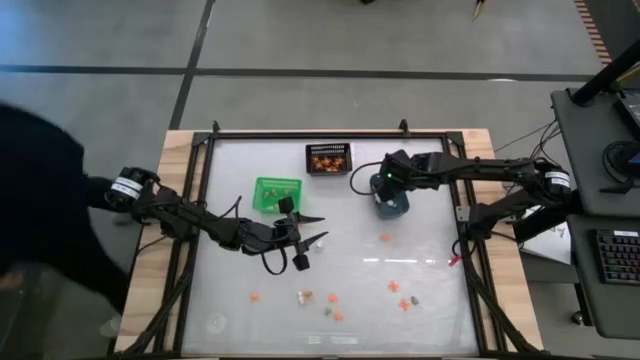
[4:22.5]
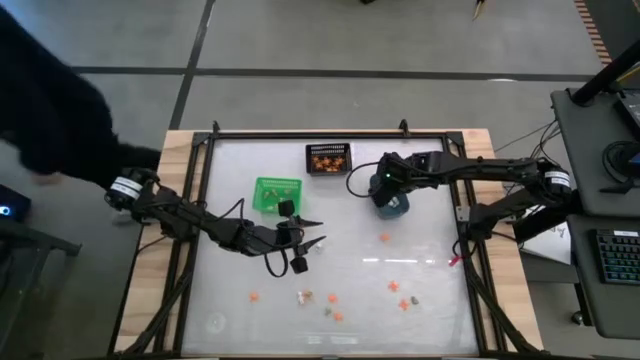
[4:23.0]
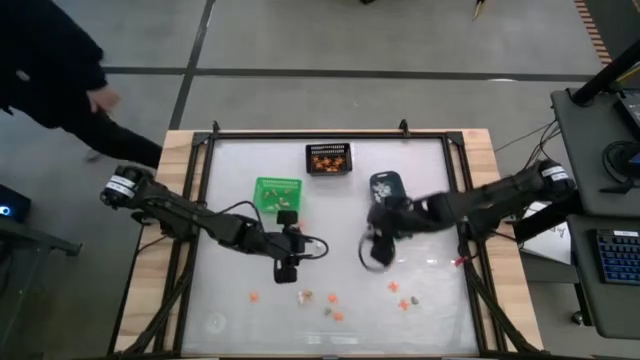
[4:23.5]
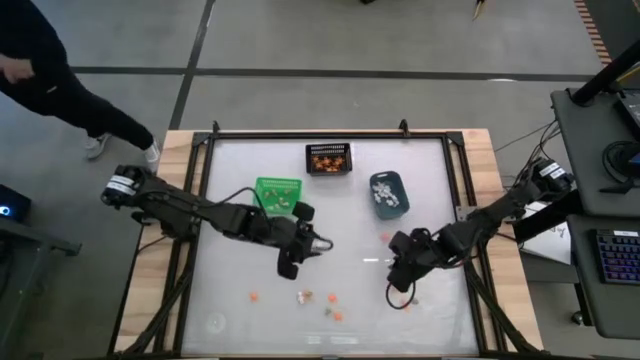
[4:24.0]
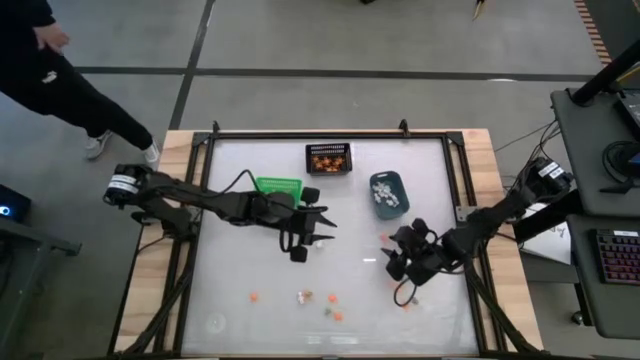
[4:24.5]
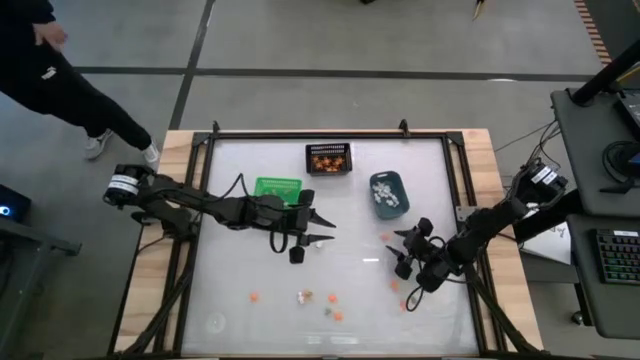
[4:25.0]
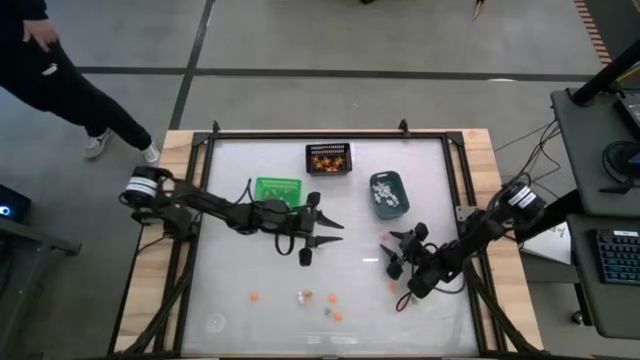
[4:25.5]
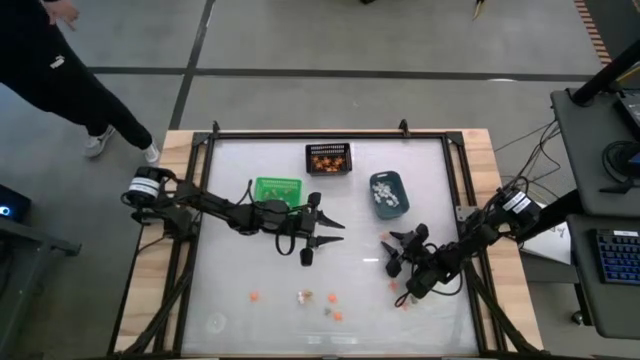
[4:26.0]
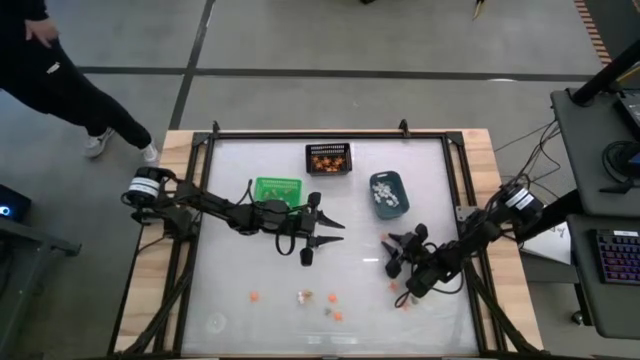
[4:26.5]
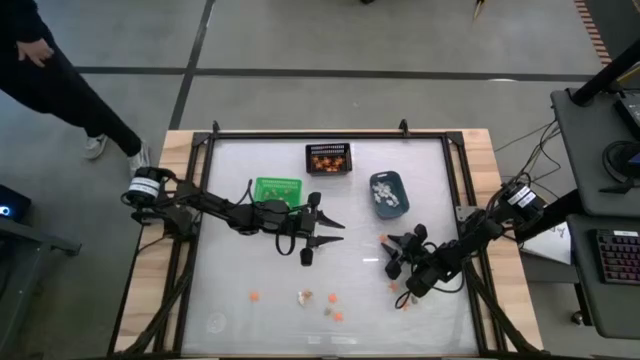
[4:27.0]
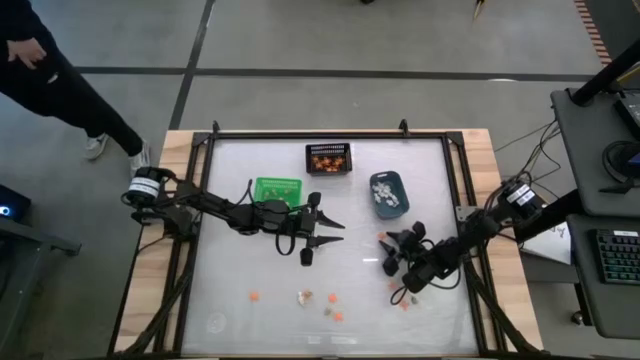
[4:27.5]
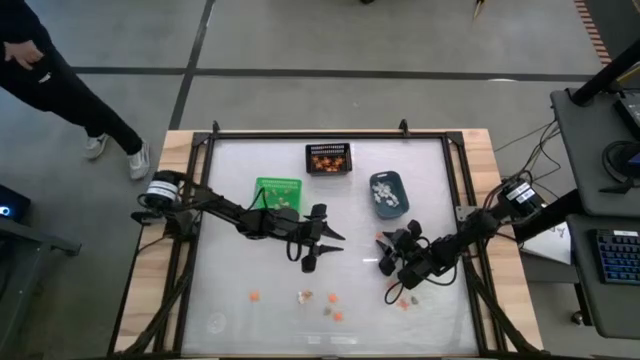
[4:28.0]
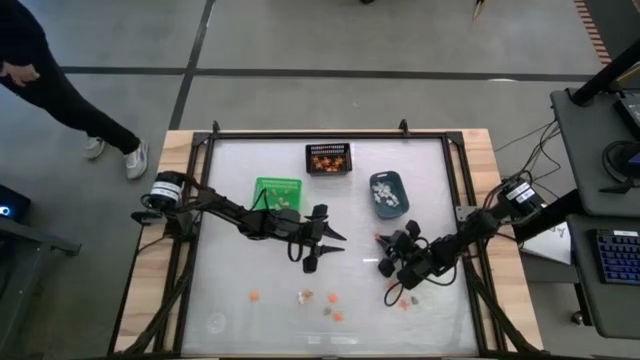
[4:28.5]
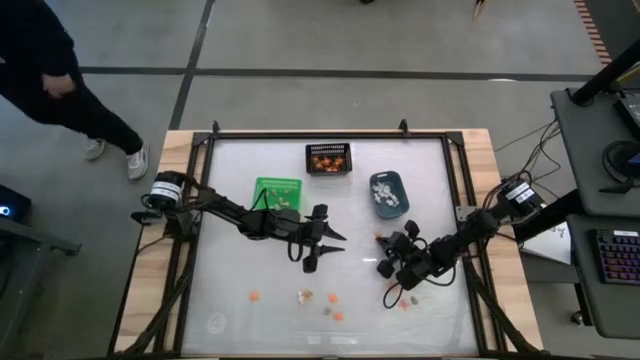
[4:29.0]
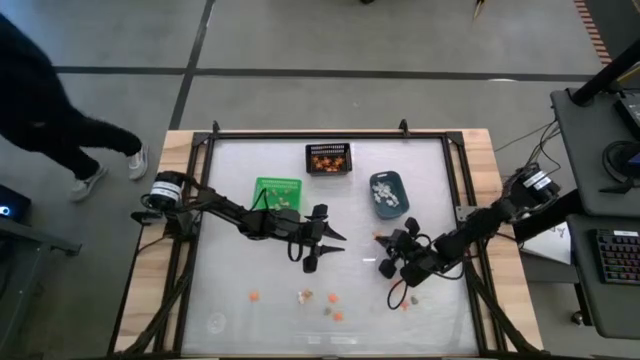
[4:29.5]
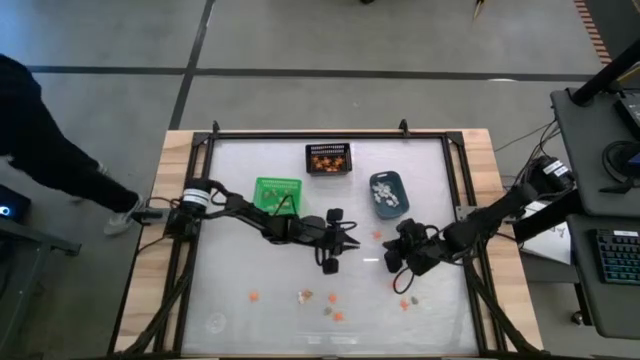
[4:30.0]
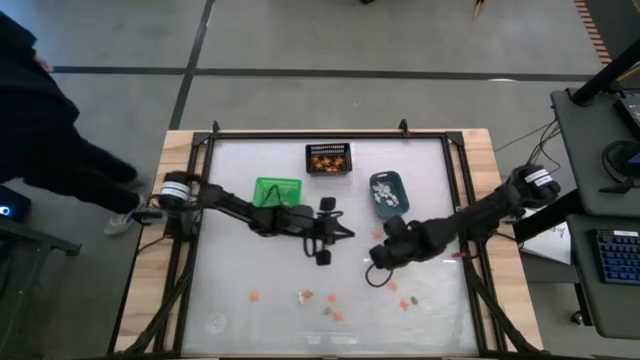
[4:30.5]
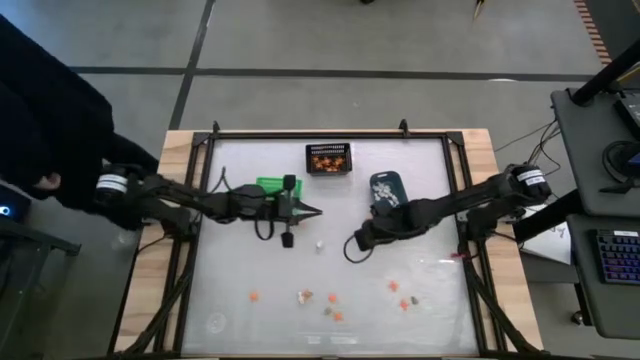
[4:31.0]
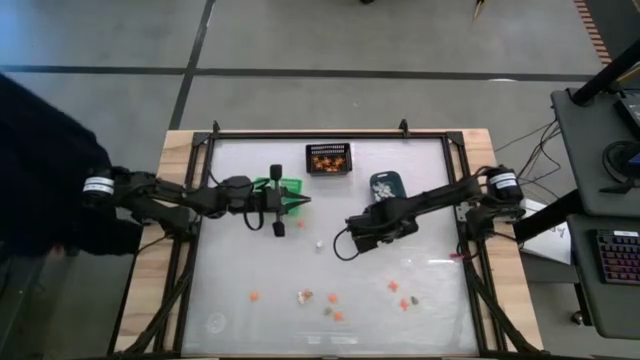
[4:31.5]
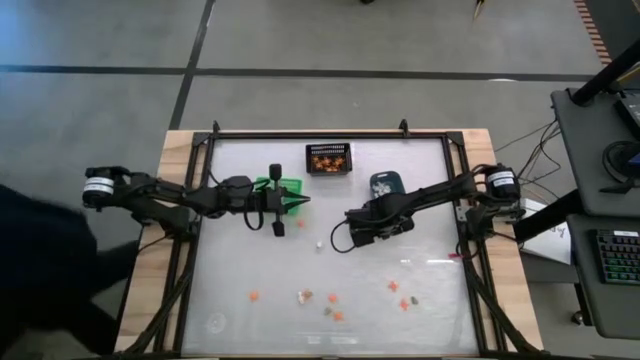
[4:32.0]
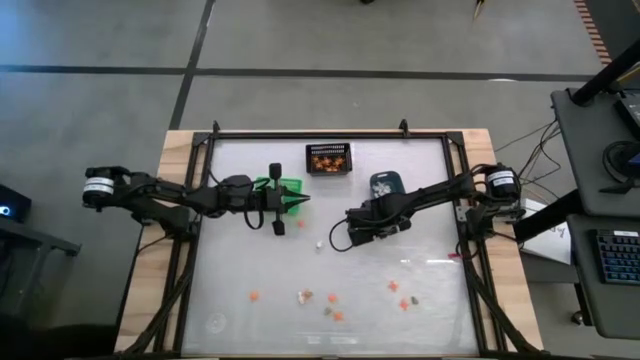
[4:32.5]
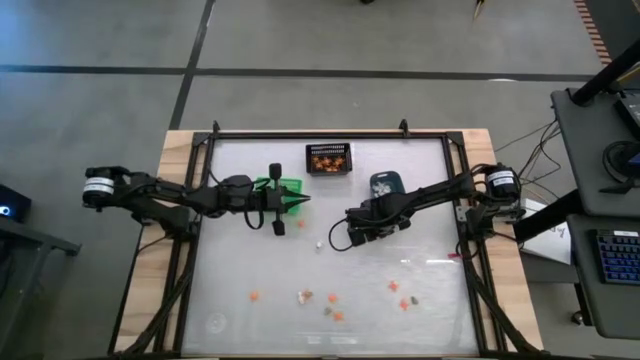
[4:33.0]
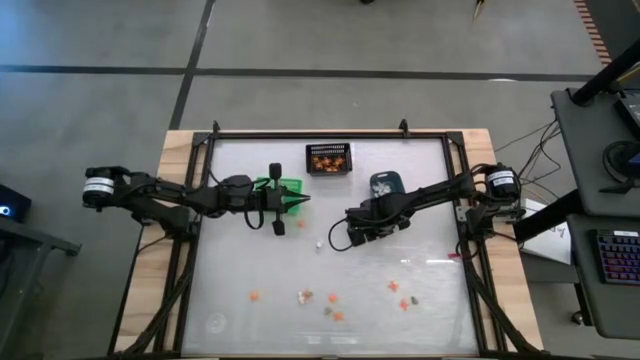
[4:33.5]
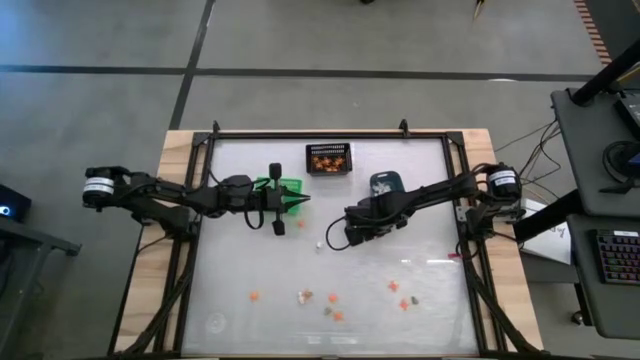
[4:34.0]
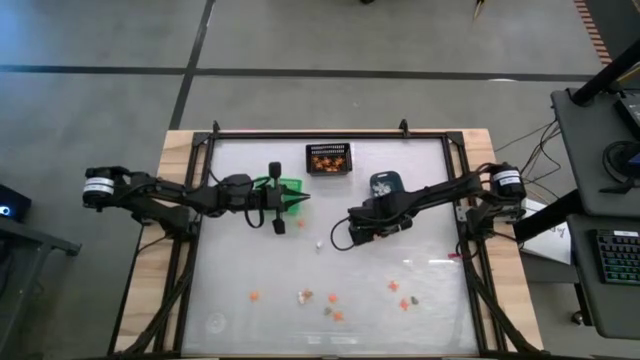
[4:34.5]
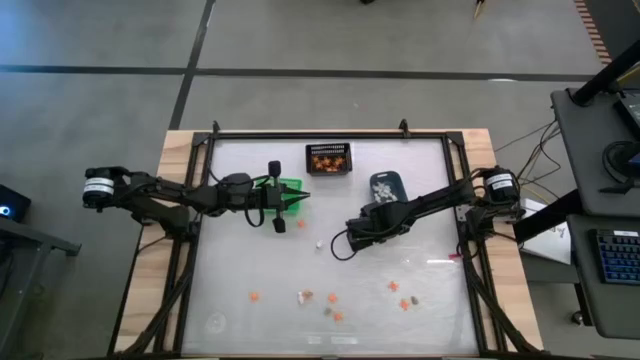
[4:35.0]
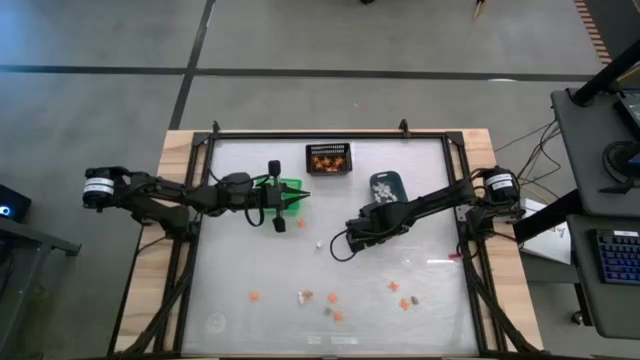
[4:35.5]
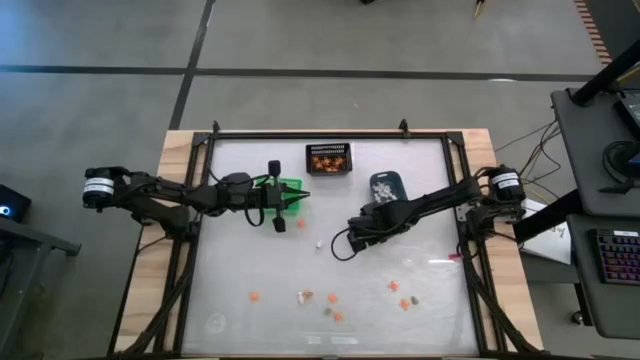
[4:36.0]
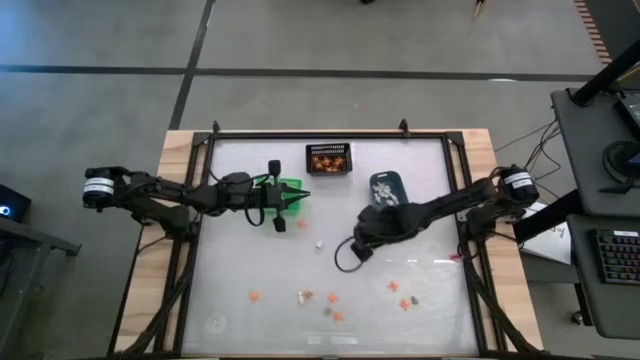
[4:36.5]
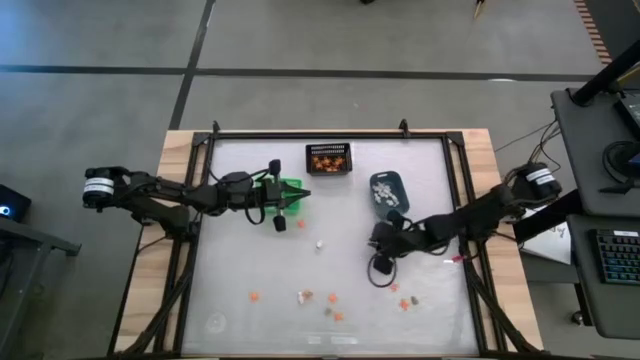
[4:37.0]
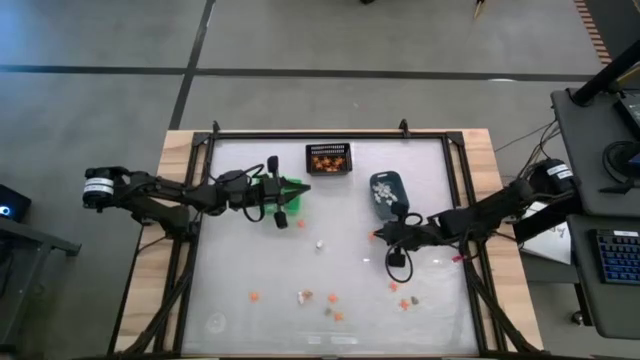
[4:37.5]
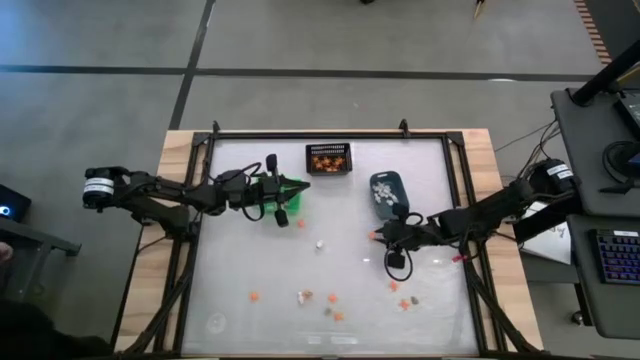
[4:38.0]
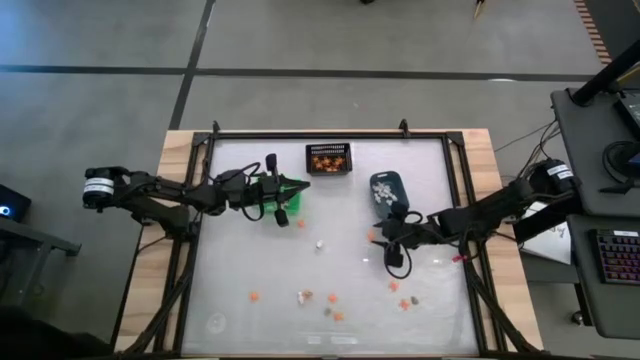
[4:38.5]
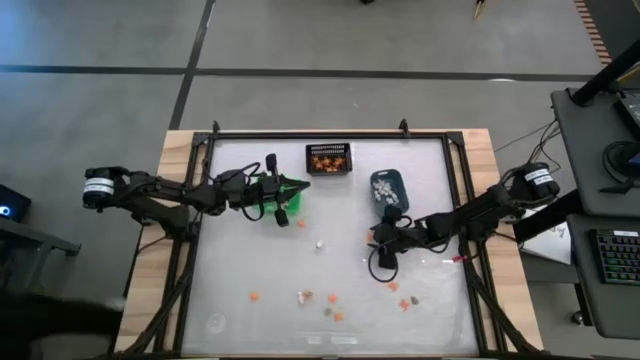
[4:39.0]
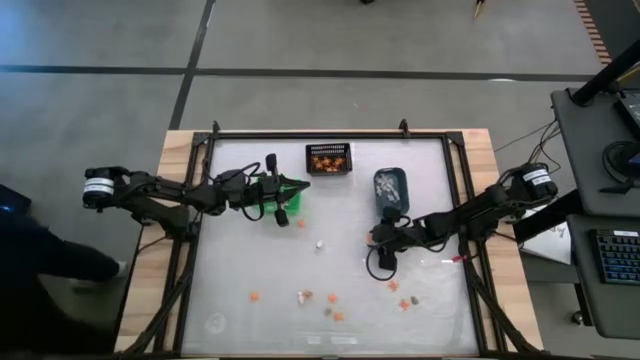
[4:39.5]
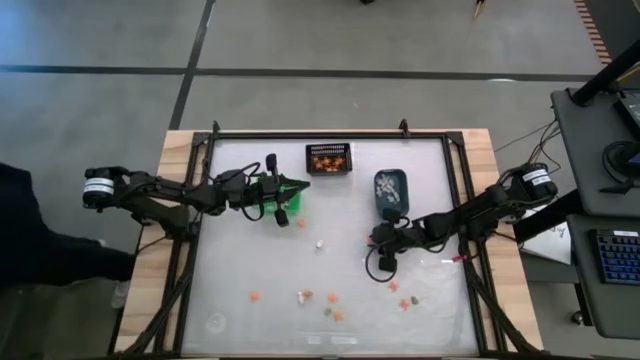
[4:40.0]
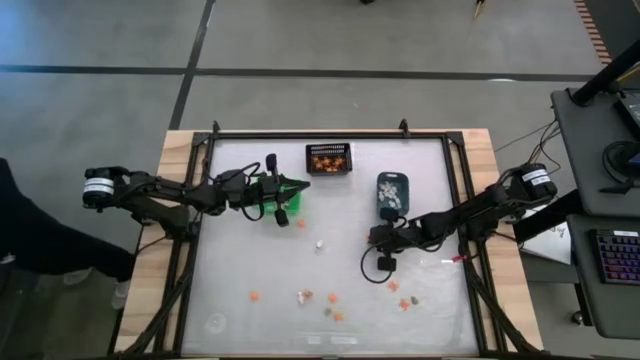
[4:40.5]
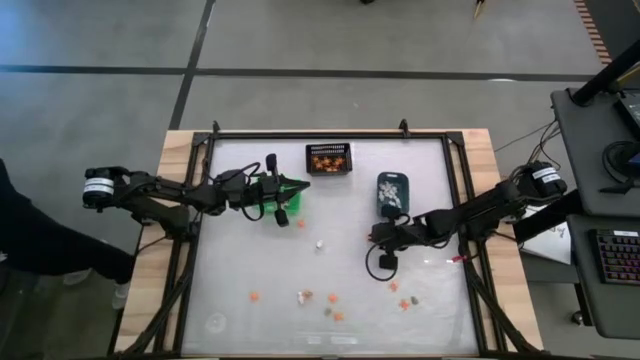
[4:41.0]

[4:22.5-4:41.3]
Task: Sort Halloween decoration
Put the orange spider toy into the black bin

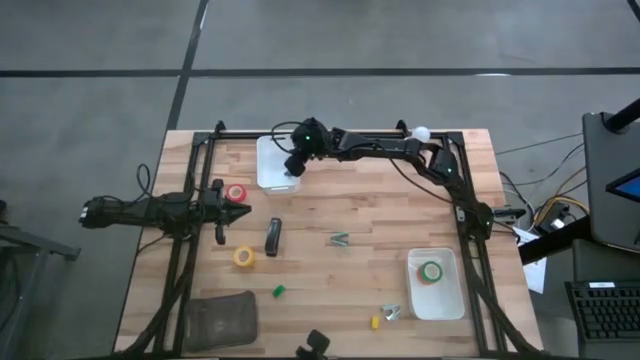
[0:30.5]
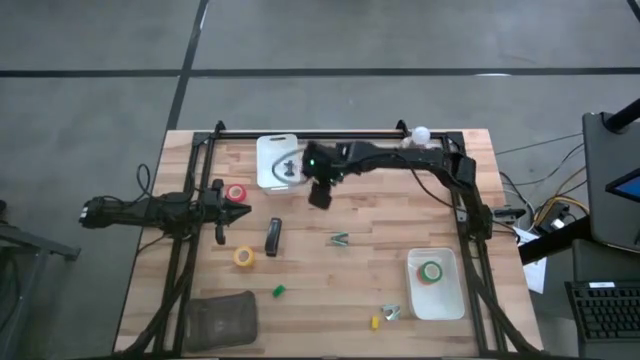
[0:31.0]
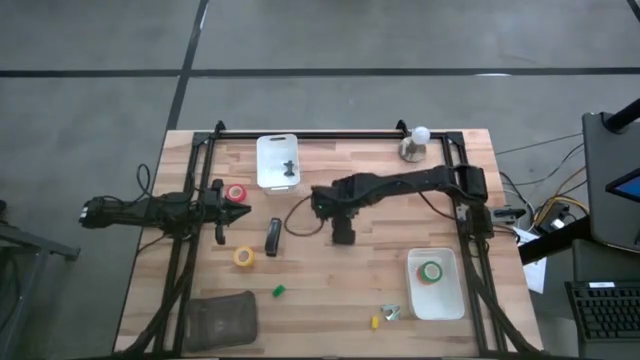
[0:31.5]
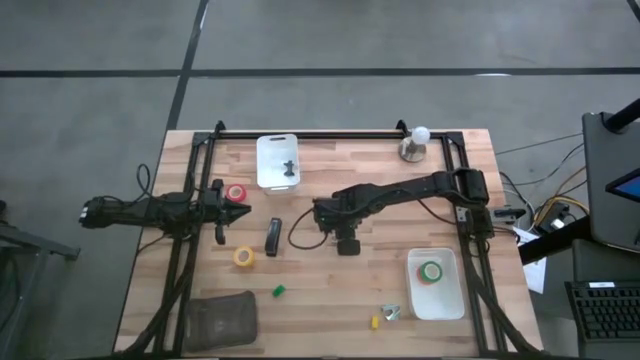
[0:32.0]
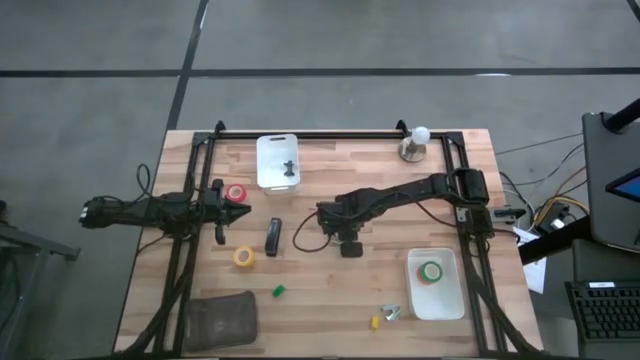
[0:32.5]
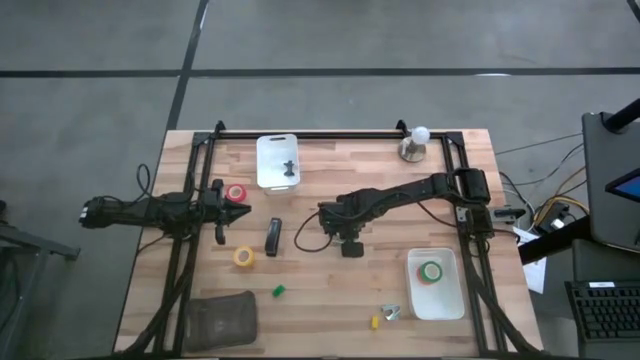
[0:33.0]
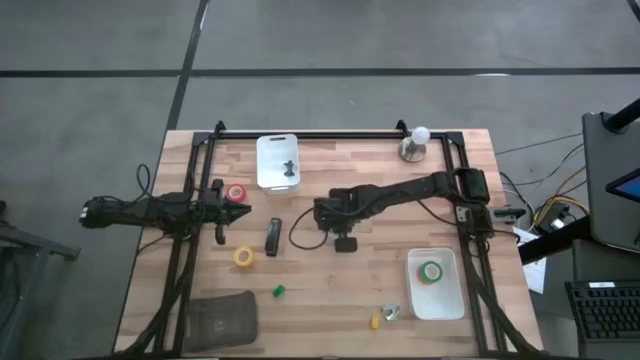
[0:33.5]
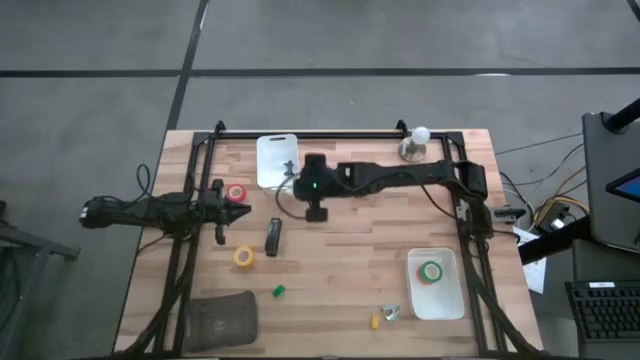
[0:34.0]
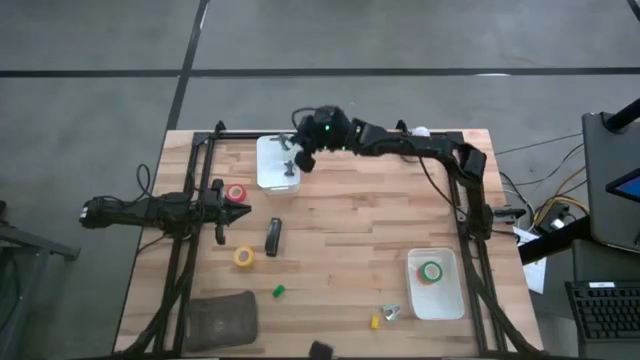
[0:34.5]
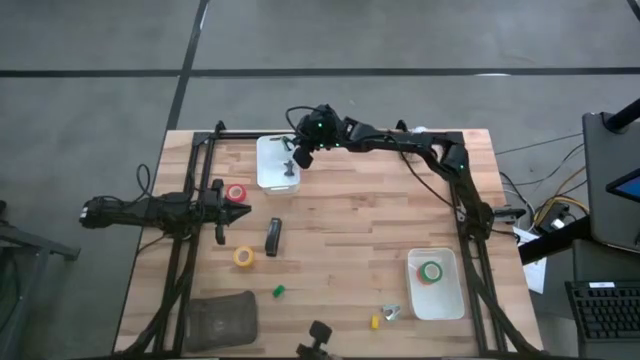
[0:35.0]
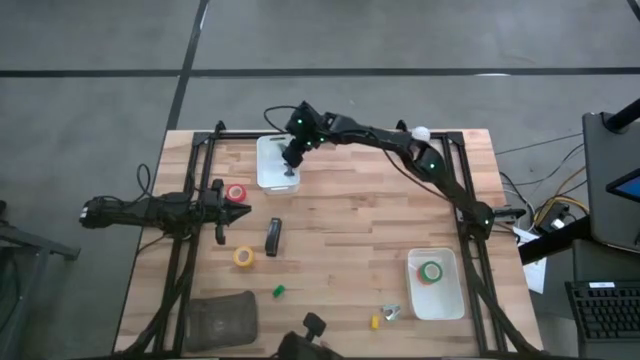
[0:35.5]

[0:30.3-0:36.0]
Task: Pick and place Stapler, Stapler remover, tape
Put the top blue staple remover into the top white bin
